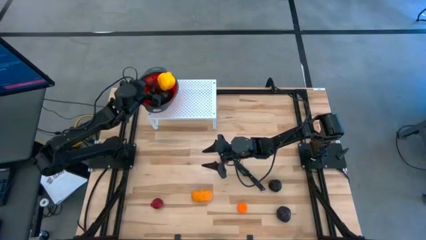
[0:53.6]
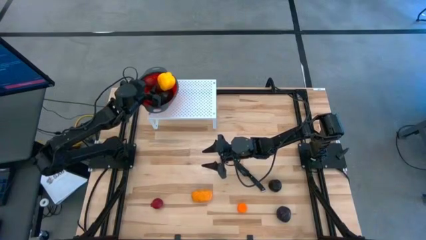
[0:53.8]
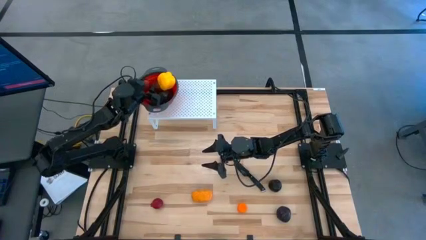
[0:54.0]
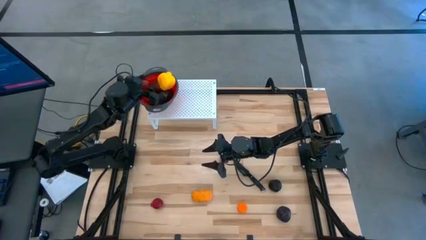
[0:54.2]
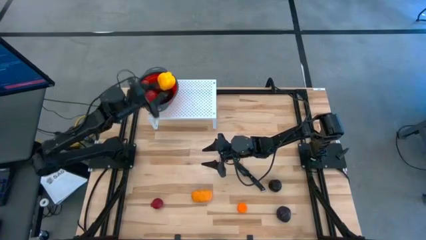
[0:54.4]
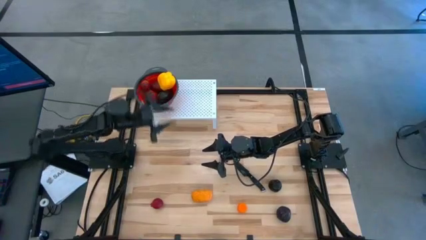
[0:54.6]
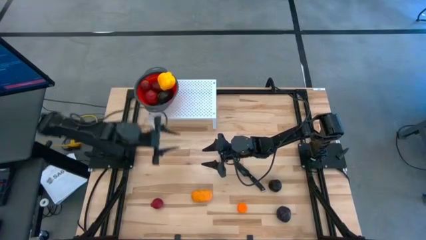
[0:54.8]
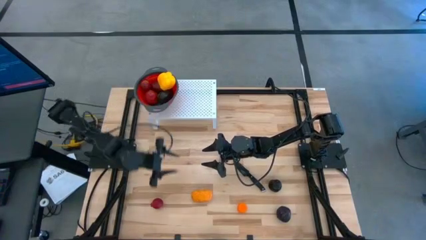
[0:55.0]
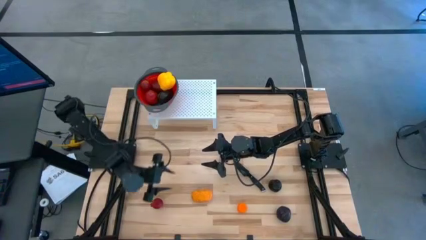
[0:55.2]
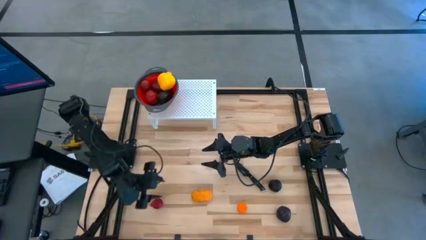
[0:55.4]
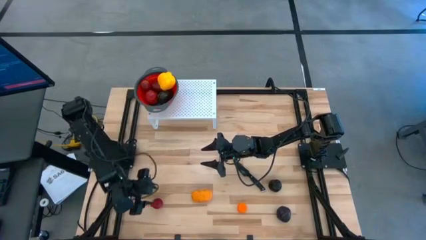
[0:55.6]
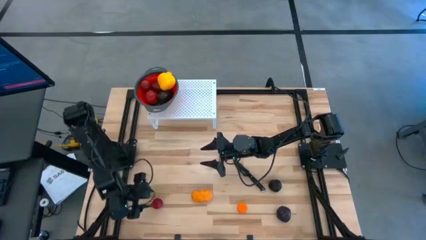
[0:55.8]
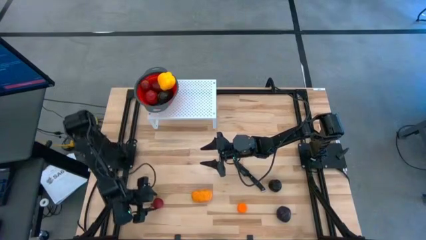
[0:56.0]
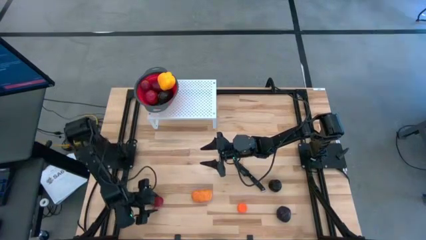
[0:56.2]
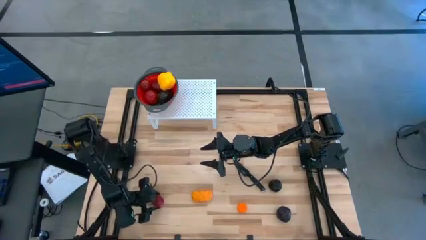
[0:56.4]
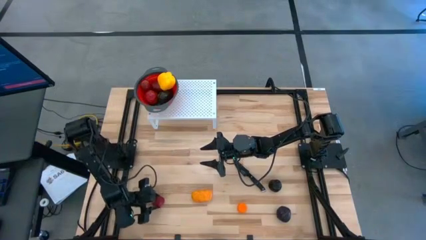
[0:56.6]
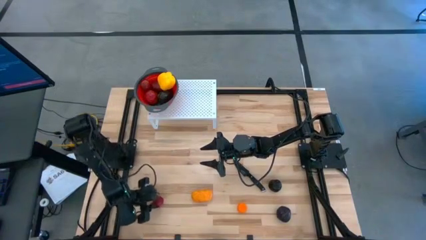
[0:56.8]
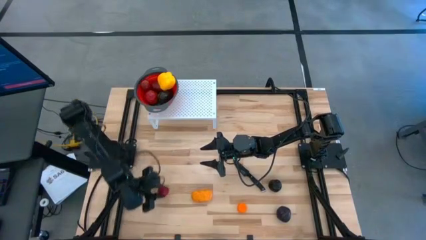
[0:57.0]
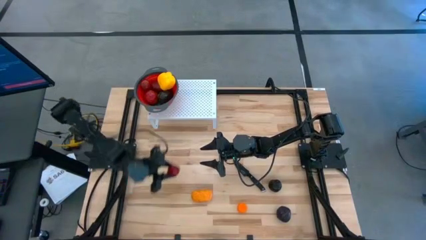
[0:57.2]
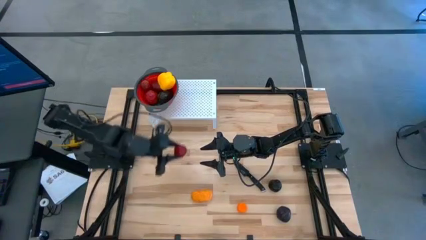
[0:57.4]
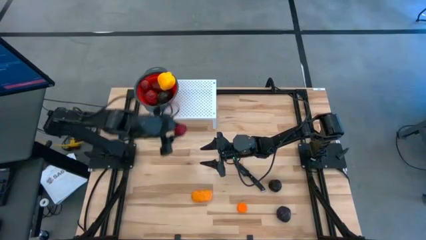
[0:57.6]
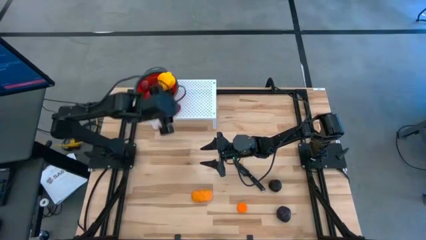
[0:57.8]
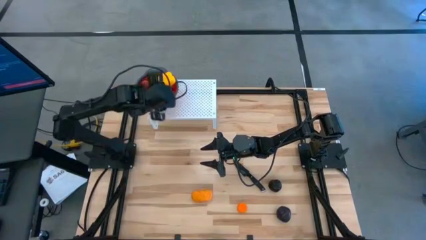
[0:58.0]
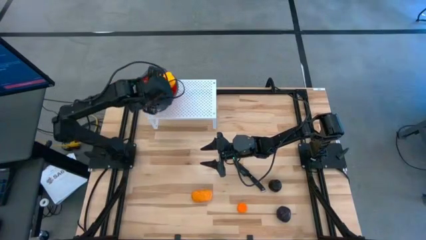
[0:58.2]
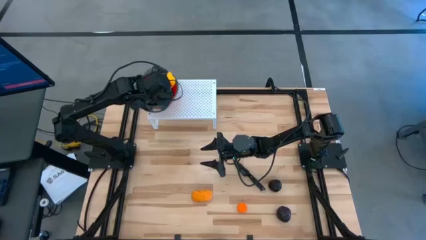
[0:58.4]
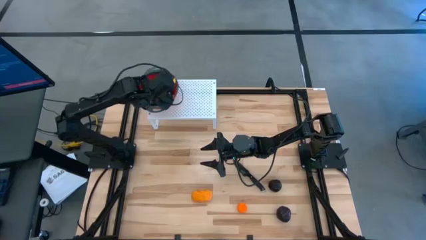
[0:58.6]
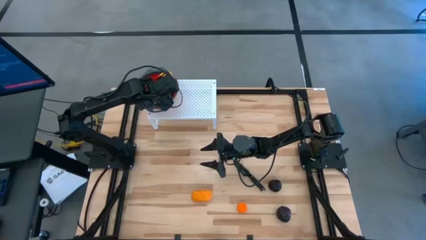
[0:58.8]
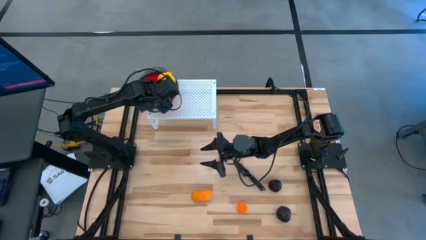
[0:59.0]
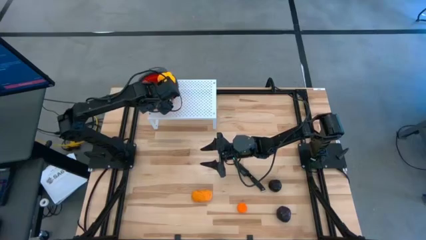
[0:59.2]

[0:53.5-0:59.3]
Task: Pick & Place Fruit
Put the red pomegranate into the red strainer bowl on the shelf

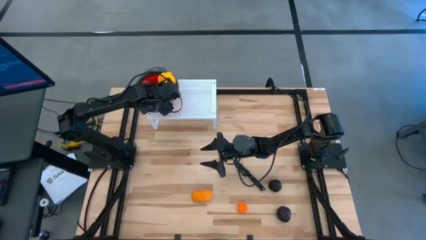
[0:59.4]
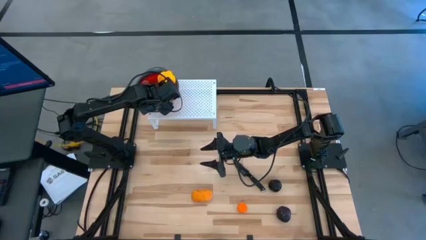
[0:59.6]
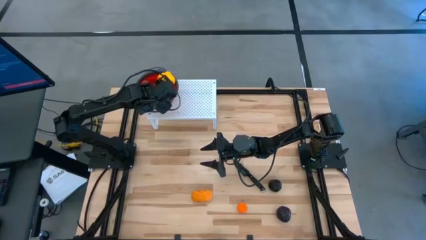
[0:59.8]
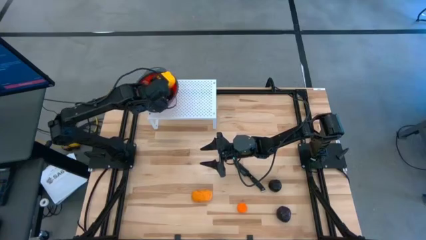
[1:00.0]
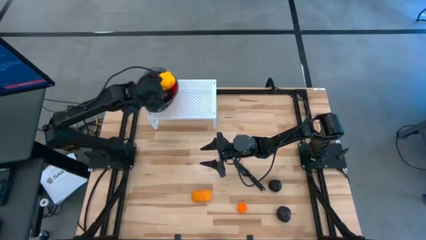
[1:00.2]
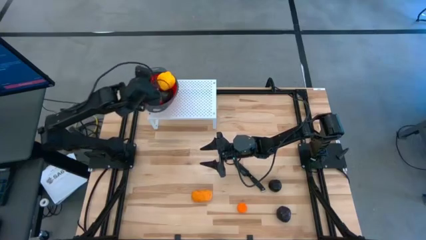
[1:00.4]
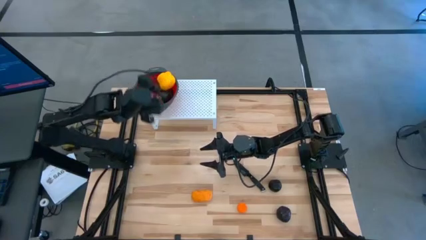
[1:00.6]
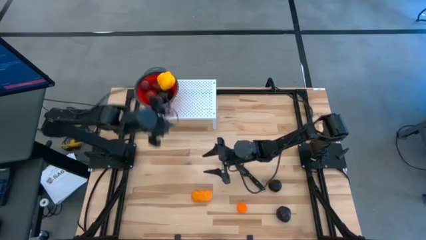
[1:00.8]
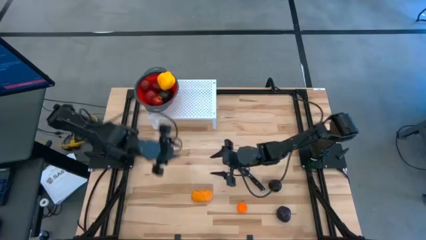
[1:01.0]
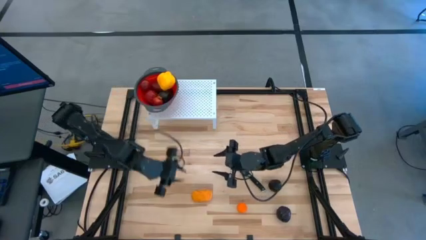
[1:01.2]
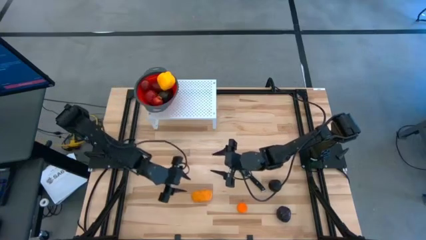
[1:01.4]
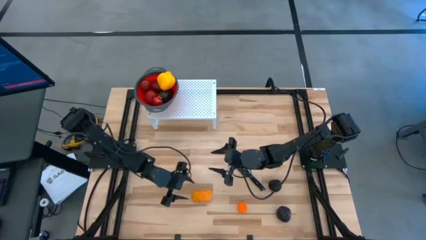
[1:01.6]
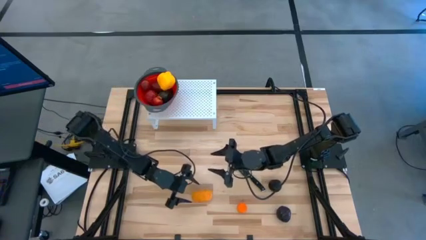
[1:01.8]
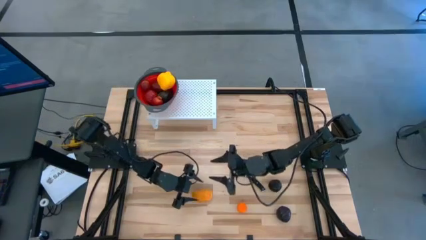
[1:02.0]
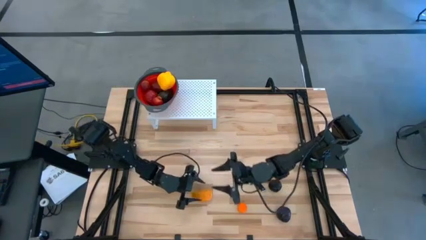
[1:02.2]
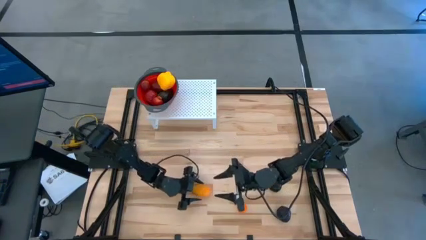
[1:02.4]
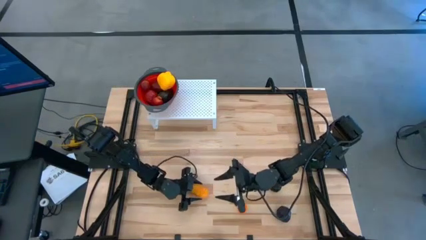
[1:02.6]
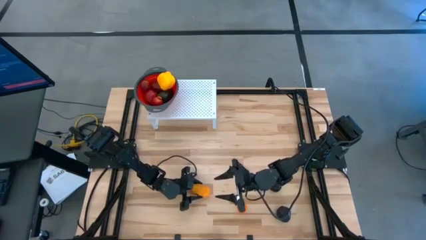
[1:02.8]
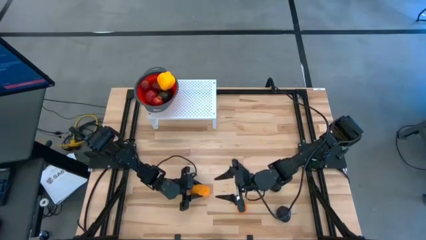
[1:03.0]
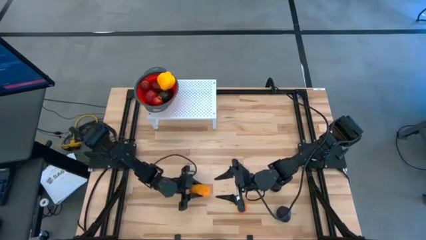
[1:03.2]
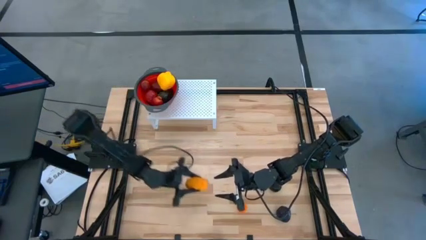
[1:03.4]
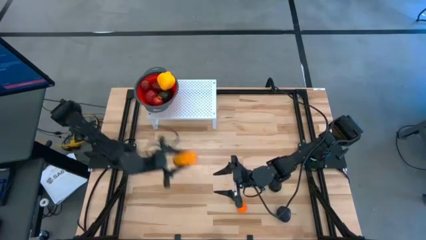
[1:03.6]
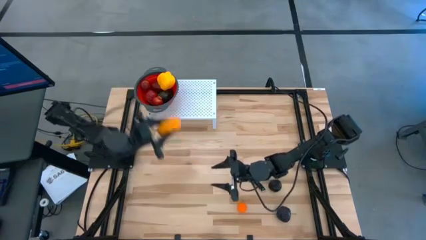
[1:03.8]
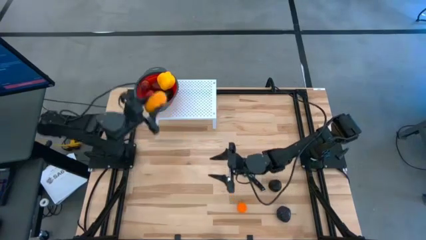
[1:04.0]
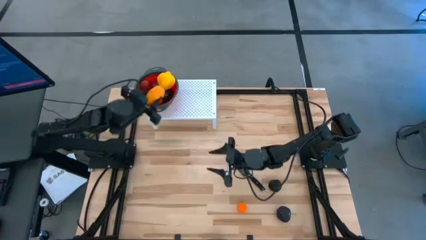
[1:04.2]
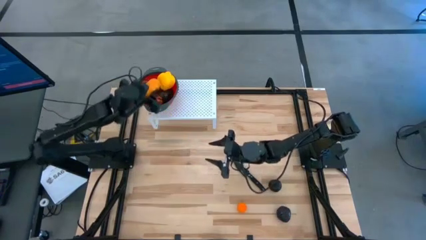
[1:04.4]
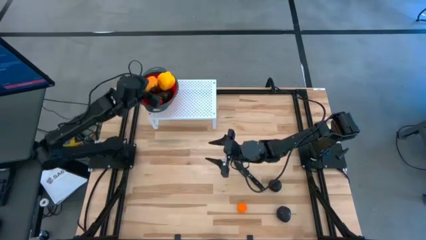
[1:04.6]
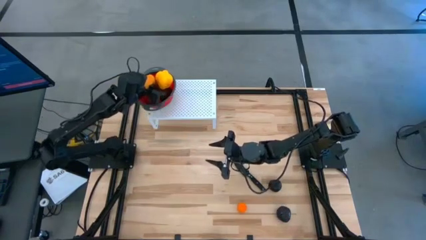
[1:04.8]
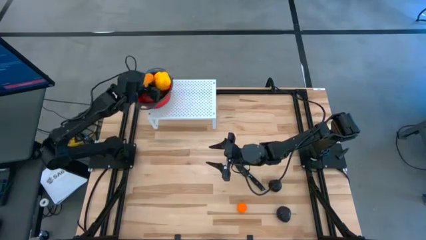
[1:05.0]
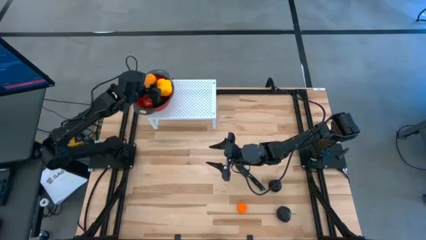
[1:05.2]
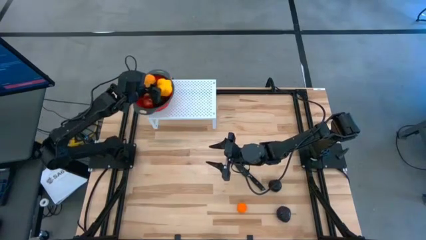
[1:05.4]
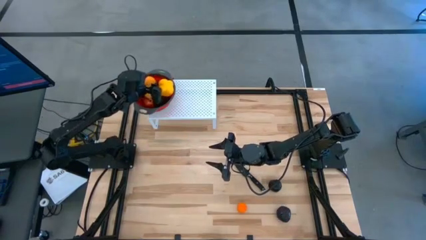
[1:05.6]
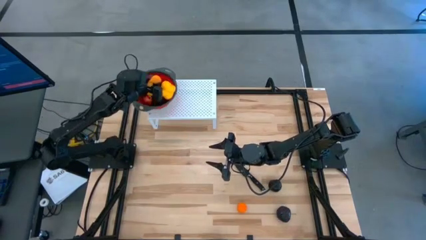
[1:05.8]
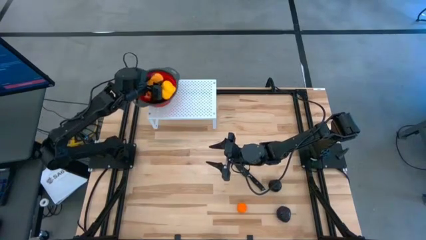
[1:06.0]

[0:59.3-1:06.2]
Put the yellow mango into the red strainer bowl on the shelf
